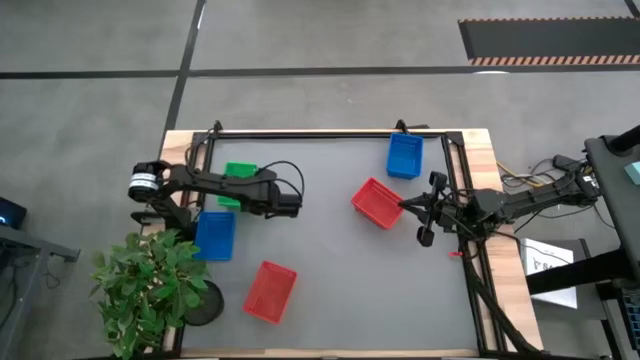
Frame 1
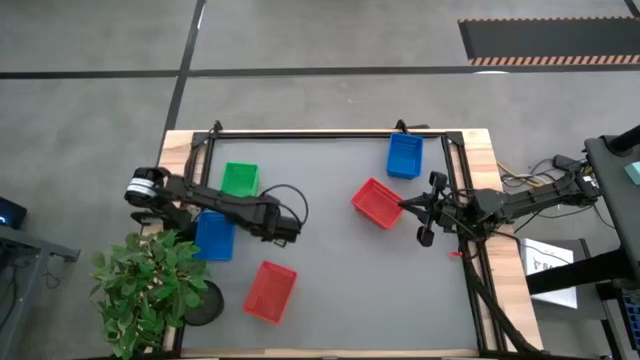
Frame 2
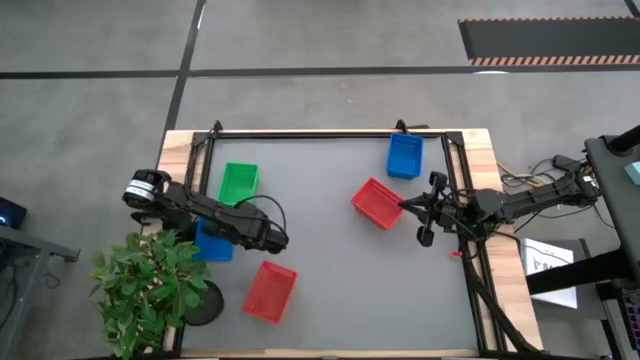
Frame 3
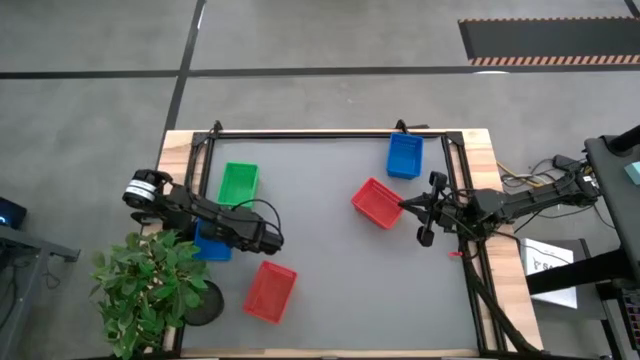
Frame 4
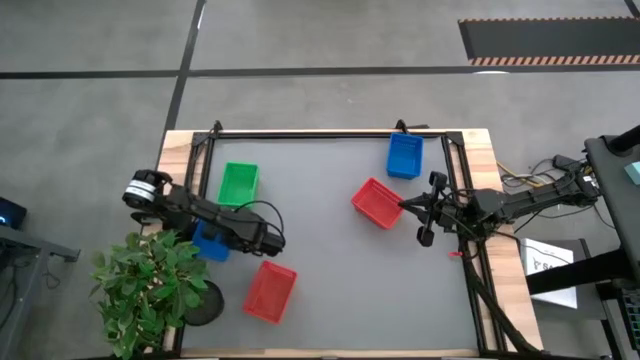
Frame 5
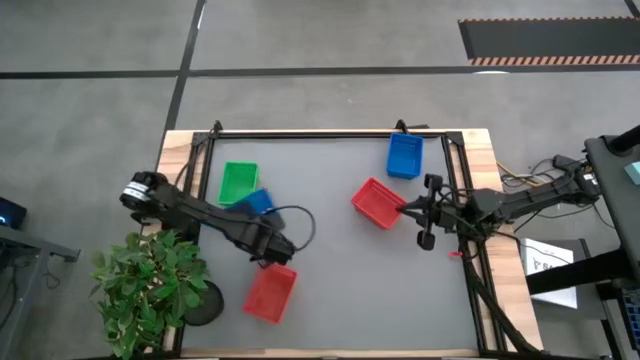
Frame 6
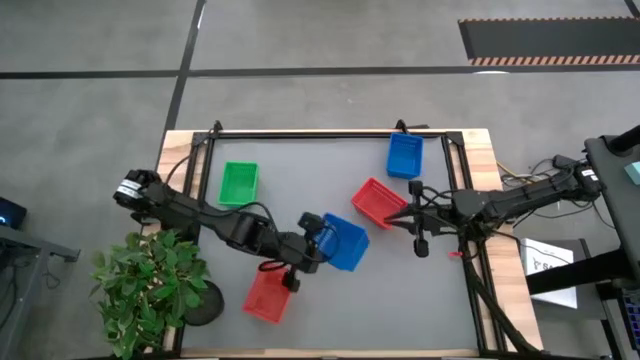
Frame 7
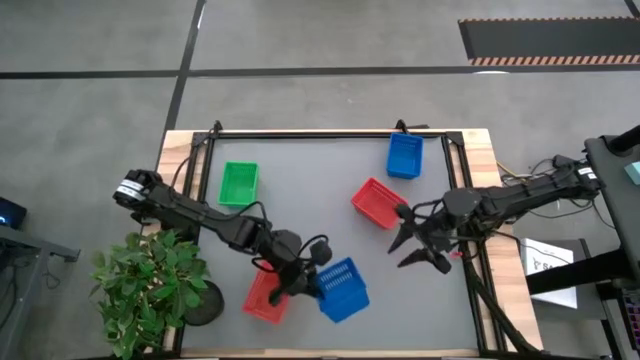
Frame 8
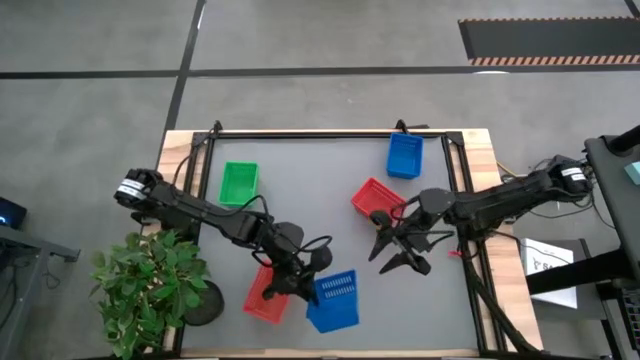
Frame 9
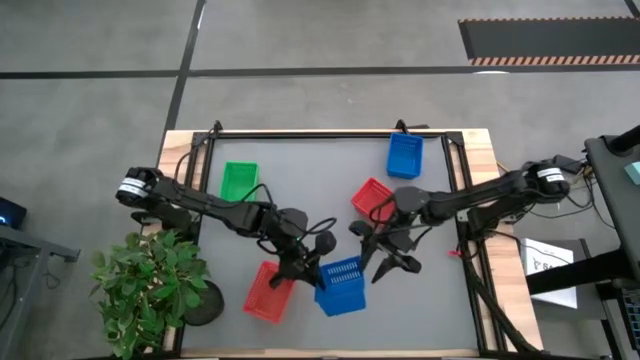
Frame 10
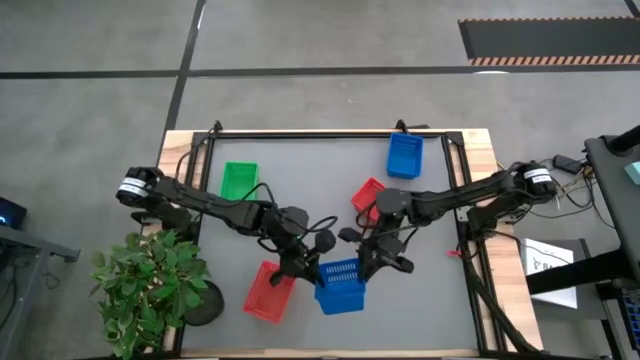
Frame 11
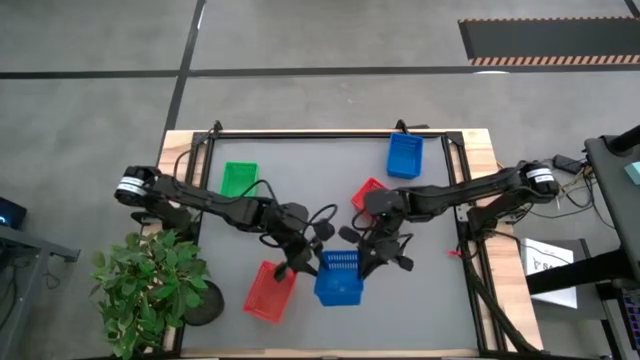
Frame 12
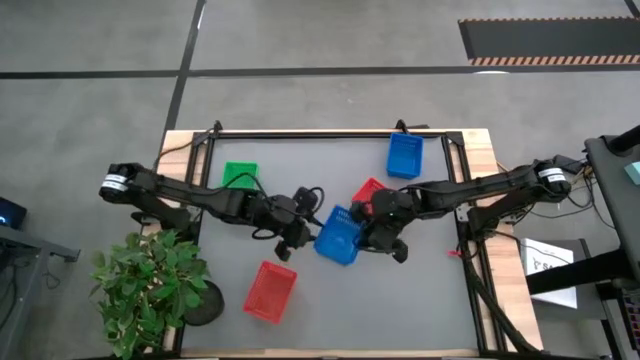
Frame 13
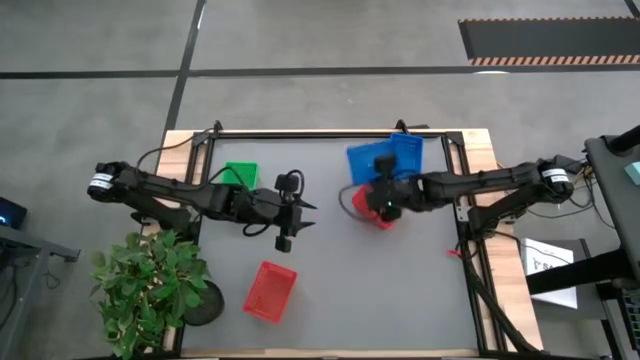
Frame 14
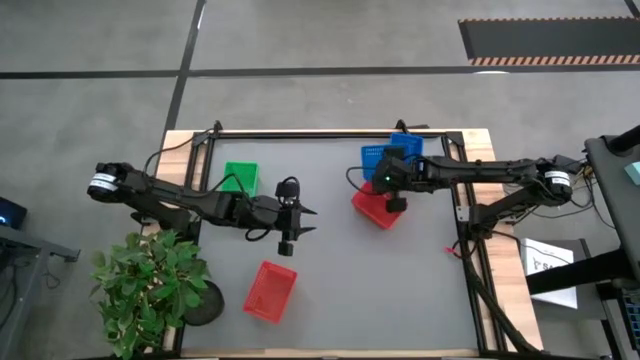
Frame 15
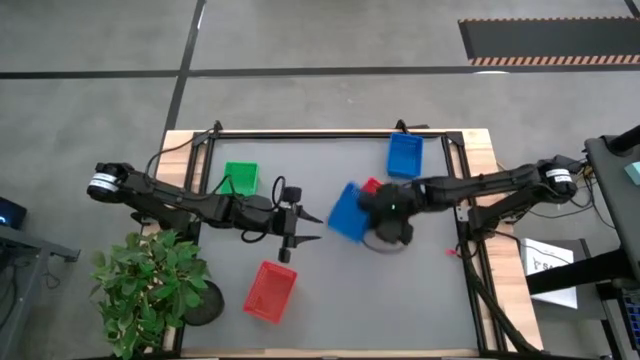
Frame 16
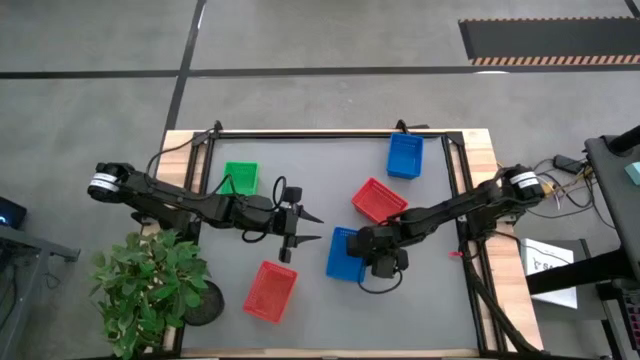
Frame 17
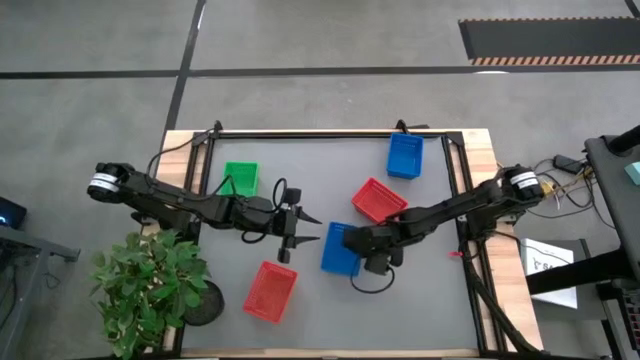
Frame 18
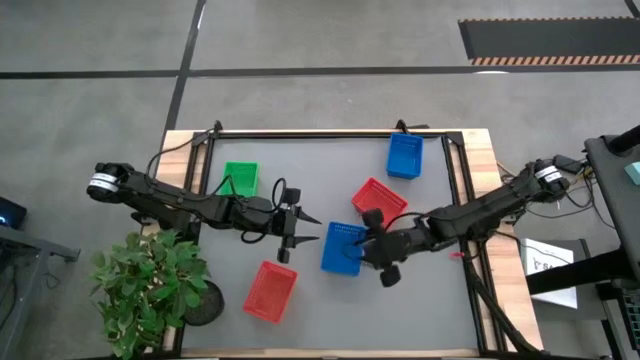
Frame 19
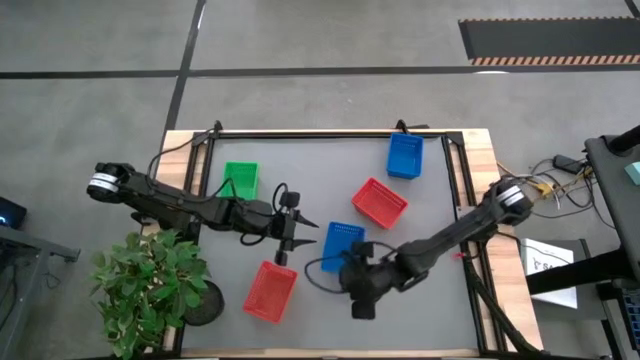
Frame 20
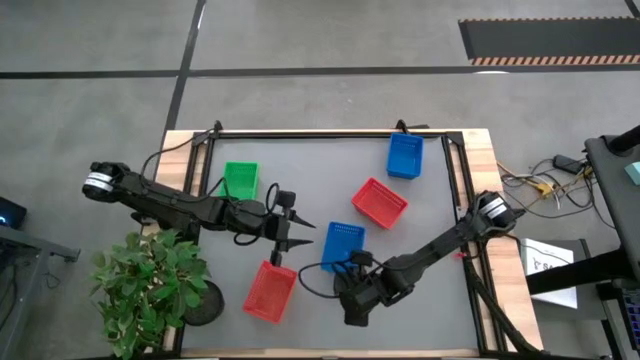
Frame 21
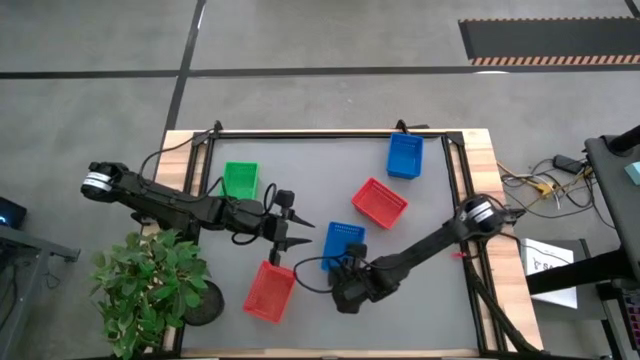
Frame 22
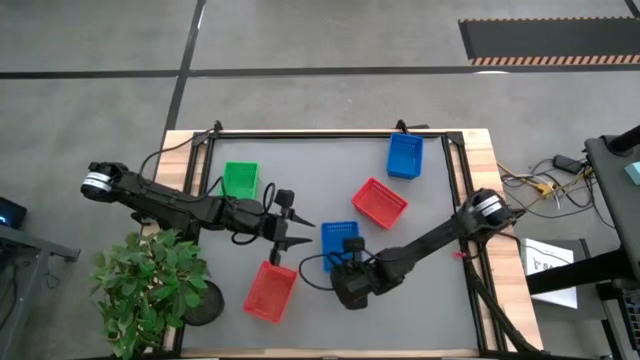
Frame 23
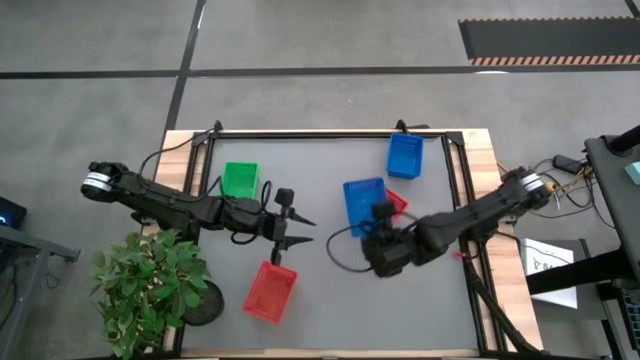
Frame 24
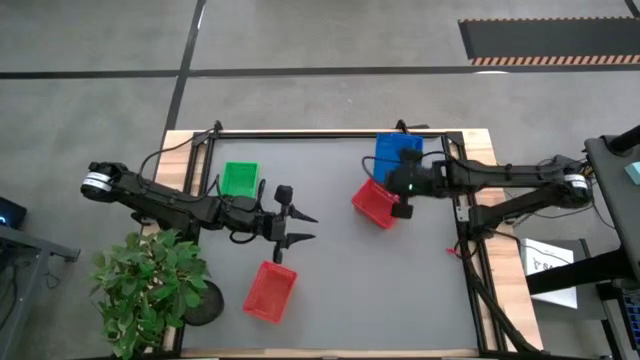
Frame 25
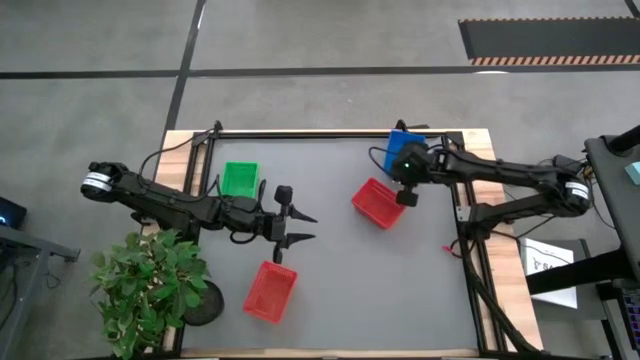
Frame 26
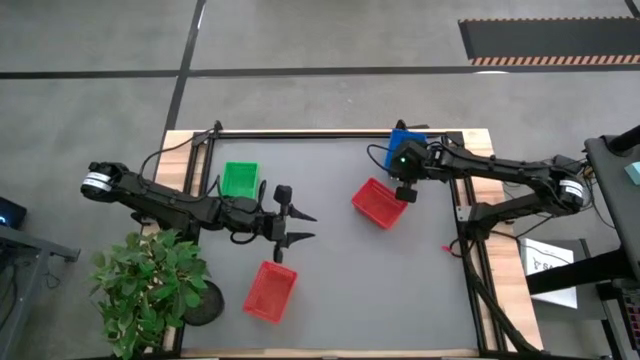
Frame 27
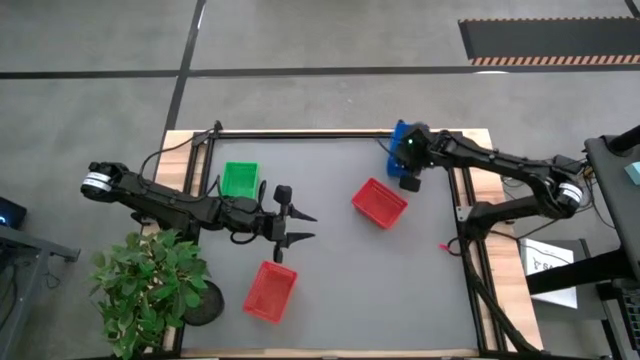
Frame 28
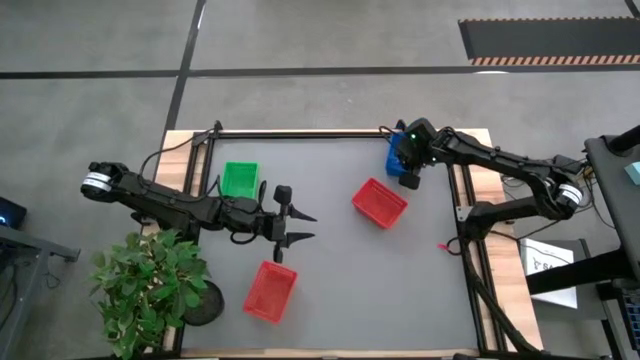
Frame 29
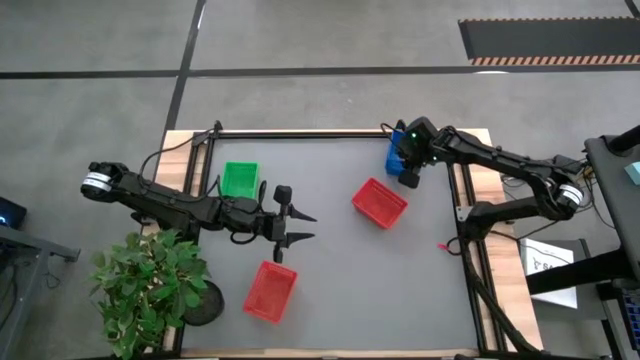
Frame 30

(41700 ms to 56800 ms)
Stack the bottom blue basket on the stacked blue baskets

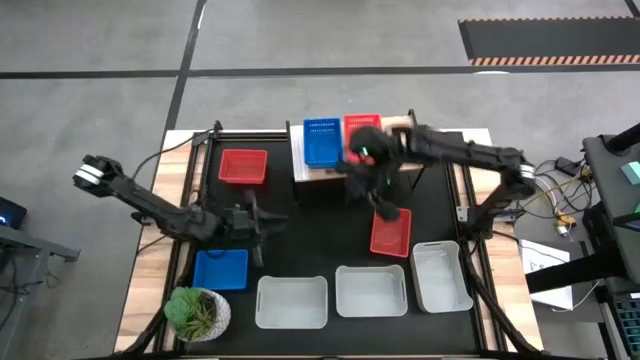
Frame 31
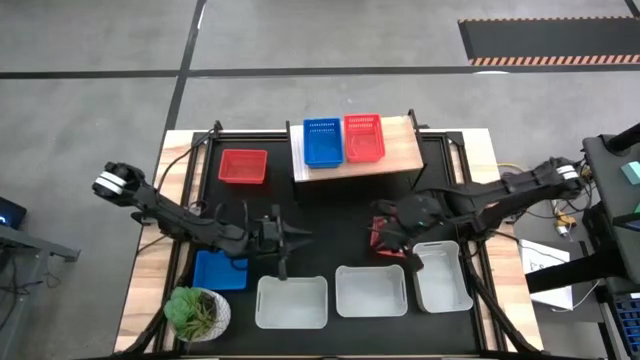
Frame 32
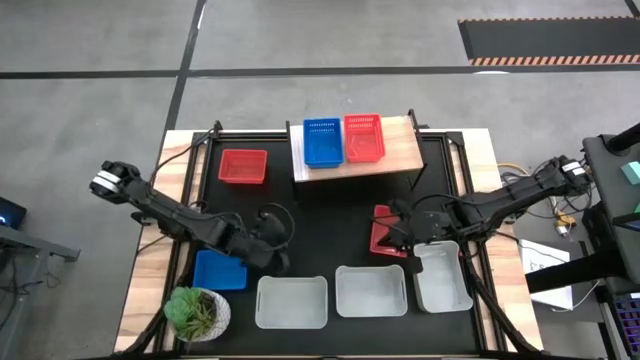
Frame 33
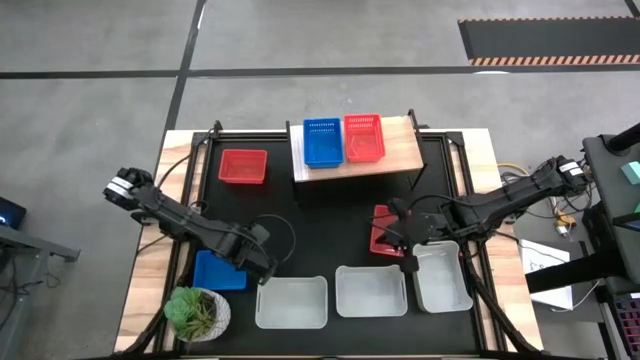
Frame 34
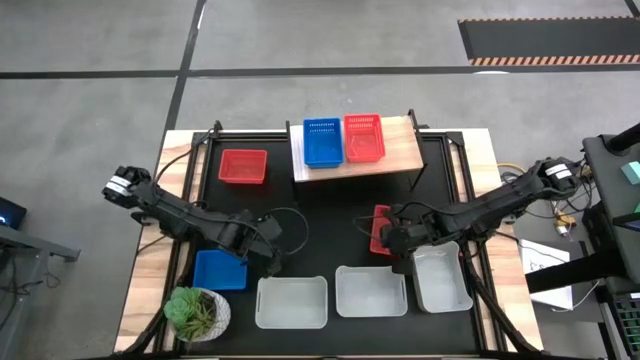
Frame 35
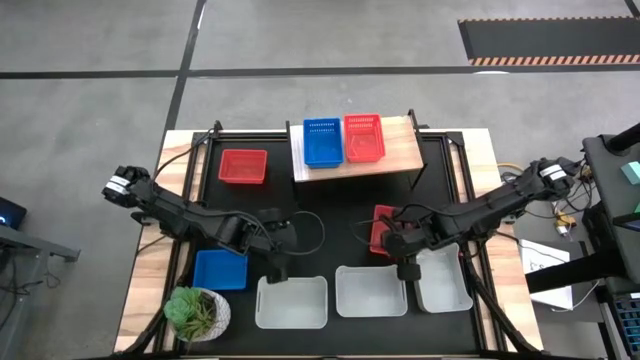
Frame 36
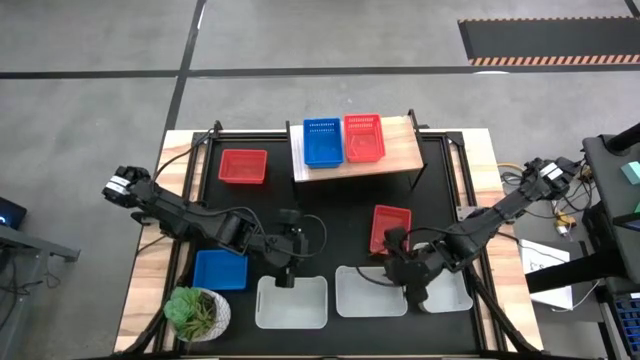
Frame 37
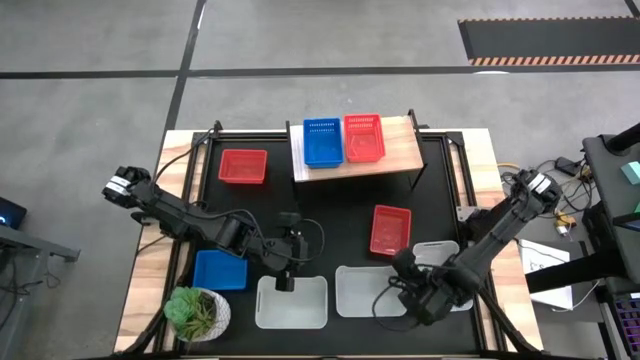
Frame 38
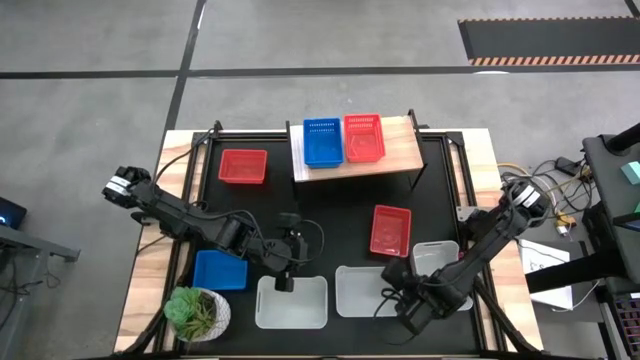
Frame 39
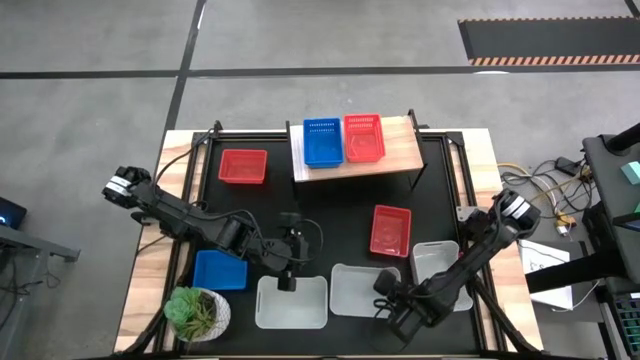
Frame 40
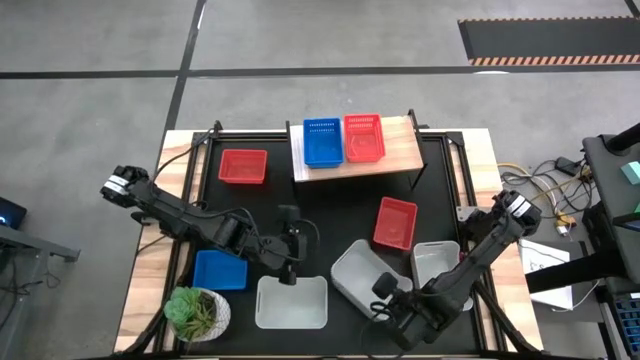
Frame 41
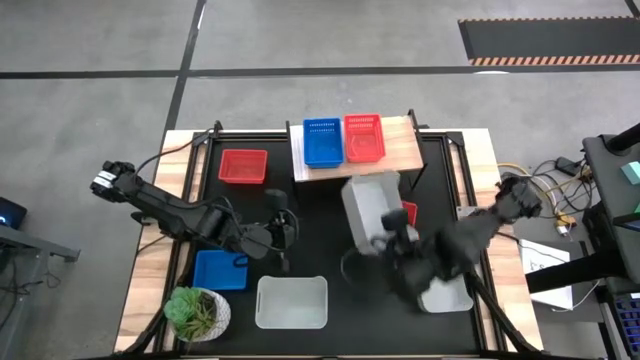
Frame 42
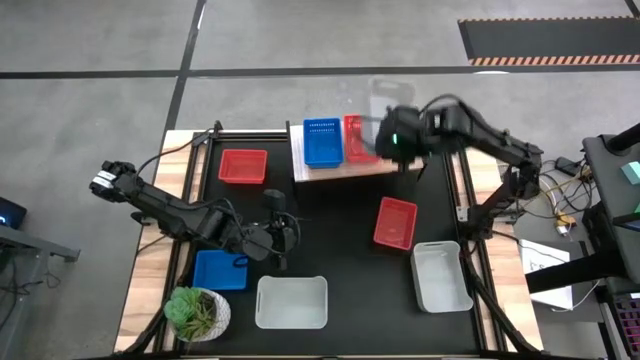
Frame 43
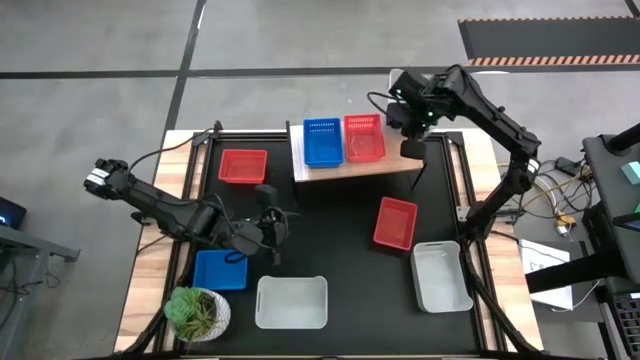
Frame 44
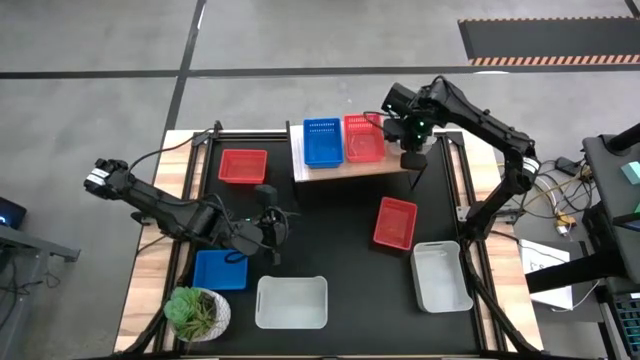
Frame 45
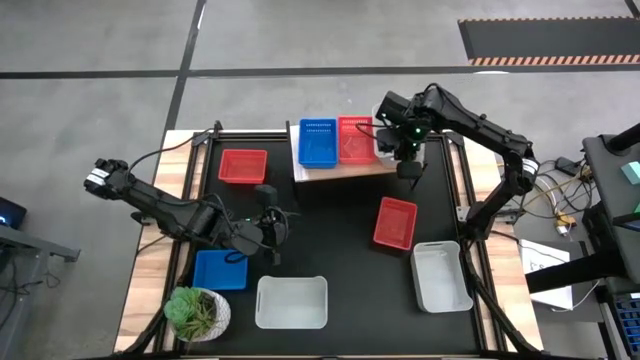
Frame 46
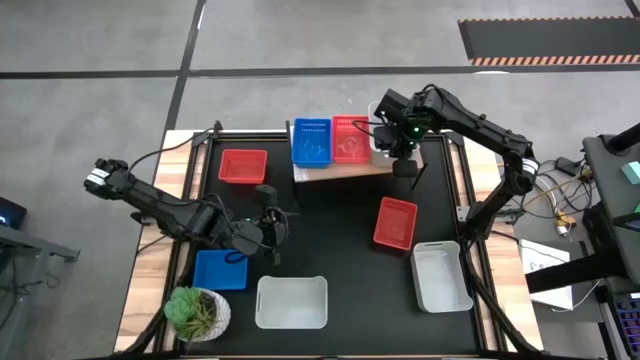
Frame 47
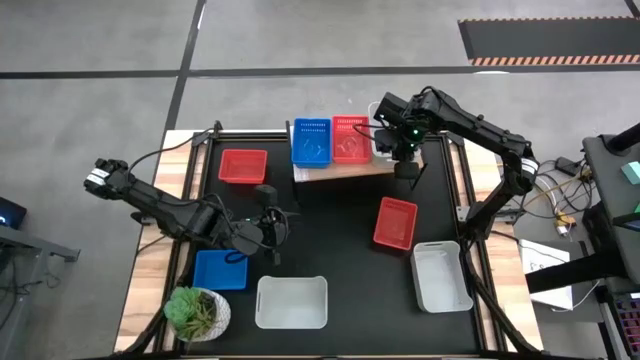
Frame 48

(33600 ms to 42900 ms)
Put the middle white bin on the shelf
